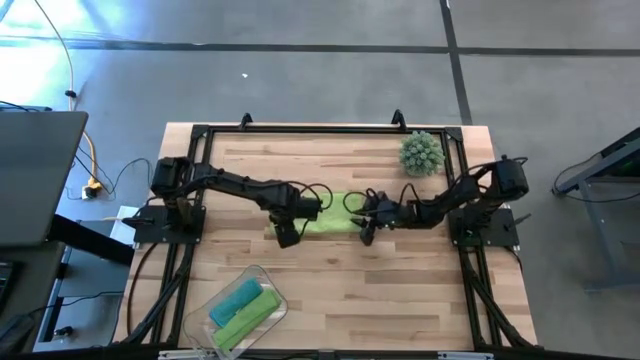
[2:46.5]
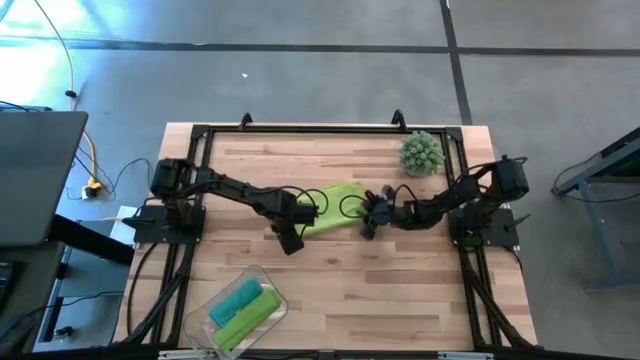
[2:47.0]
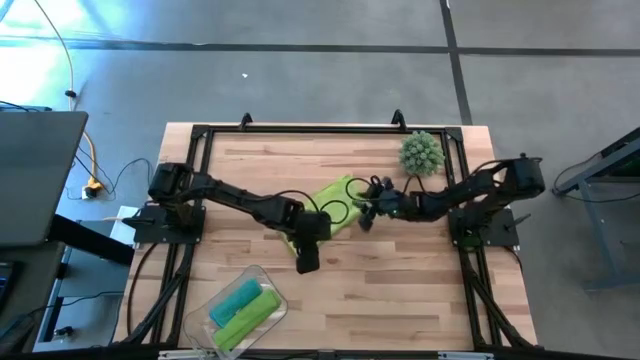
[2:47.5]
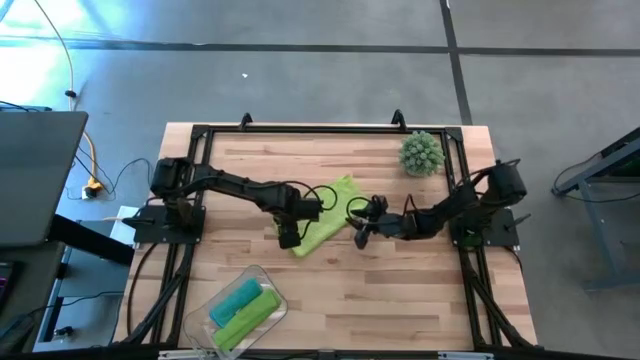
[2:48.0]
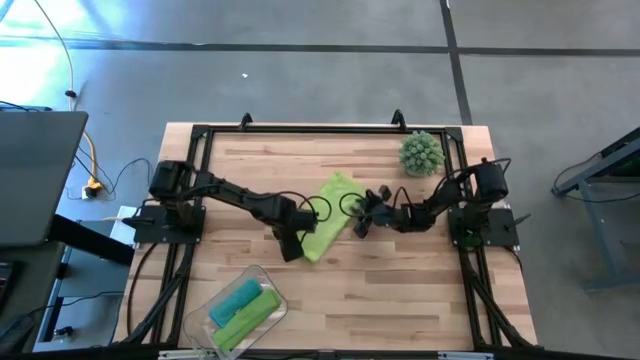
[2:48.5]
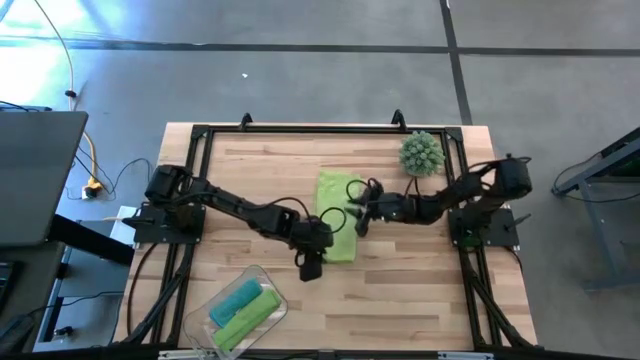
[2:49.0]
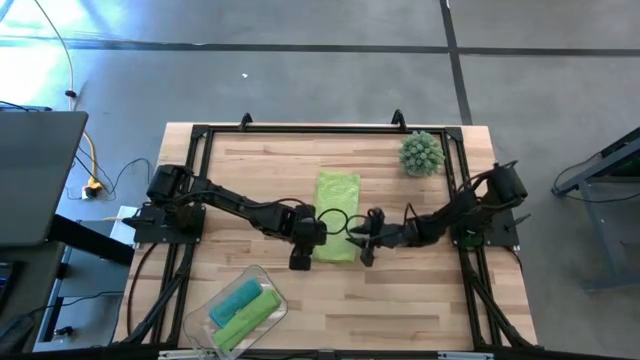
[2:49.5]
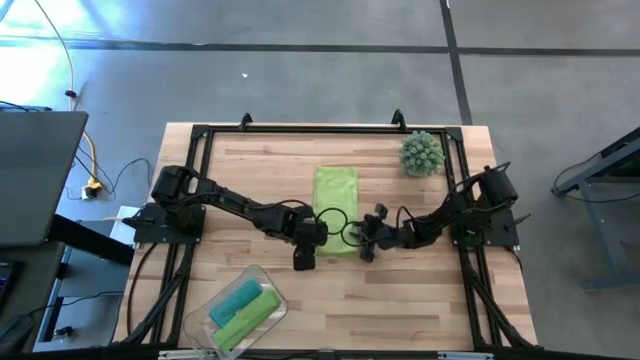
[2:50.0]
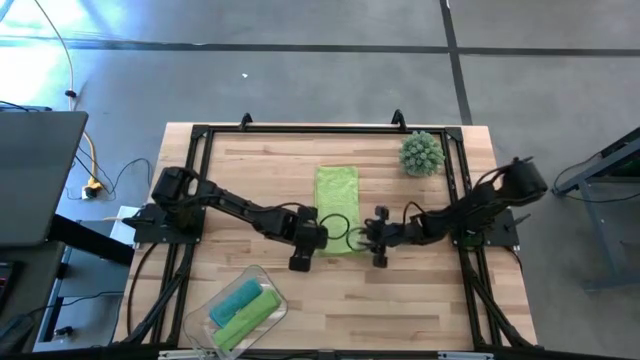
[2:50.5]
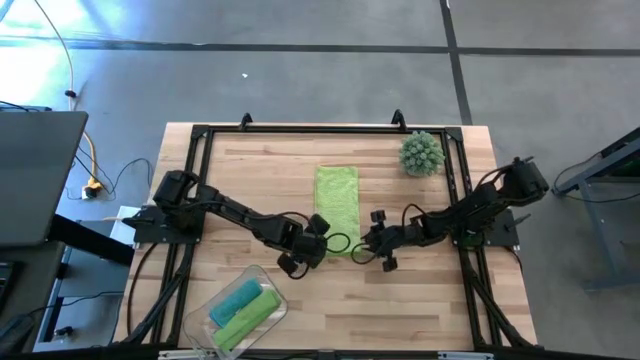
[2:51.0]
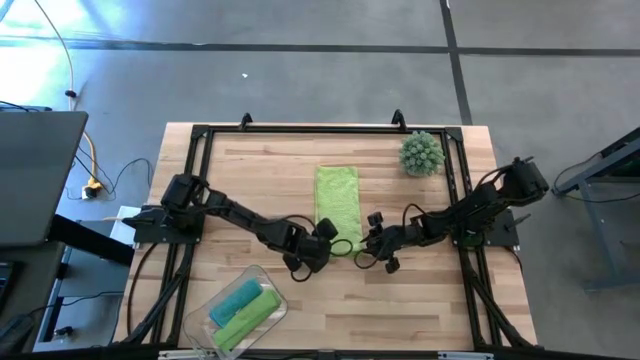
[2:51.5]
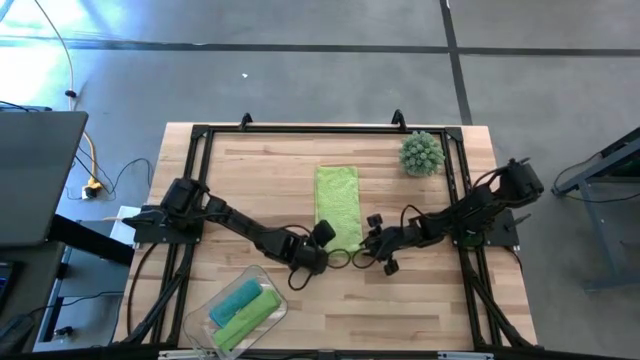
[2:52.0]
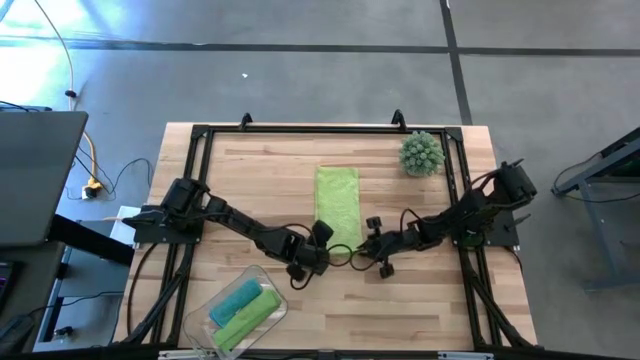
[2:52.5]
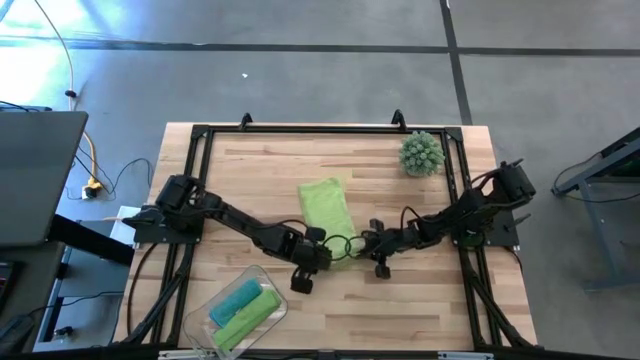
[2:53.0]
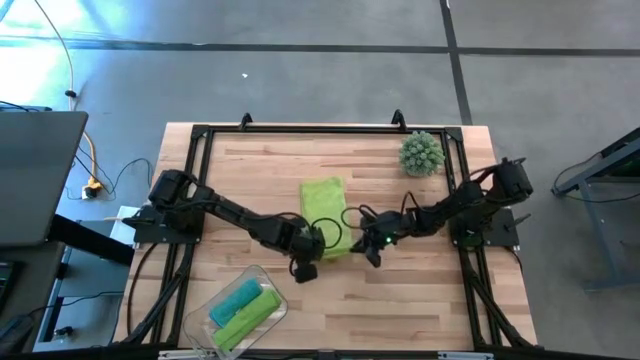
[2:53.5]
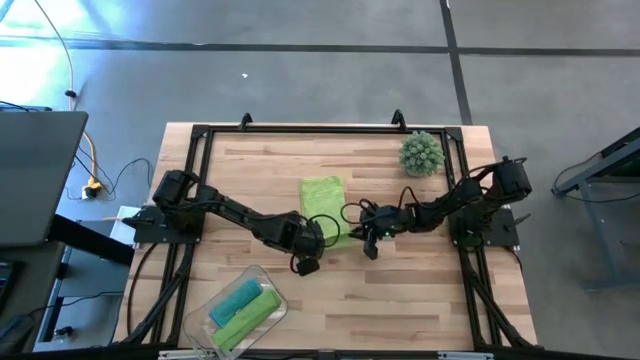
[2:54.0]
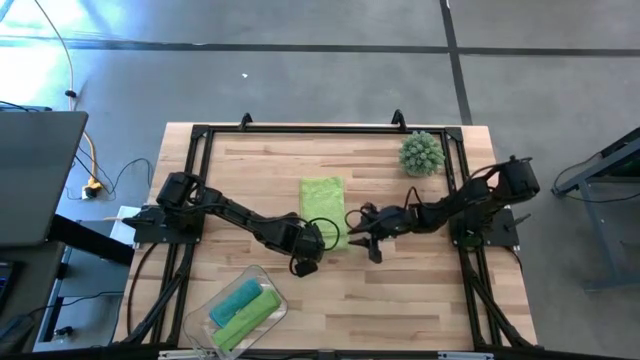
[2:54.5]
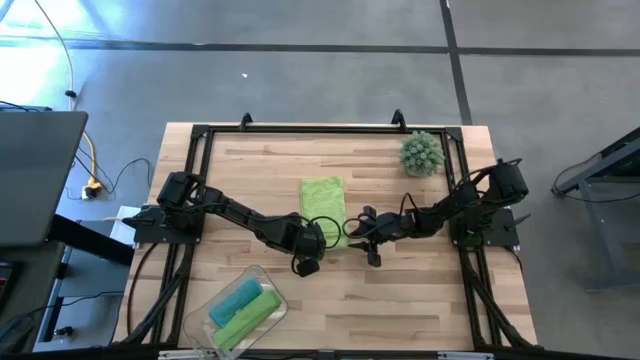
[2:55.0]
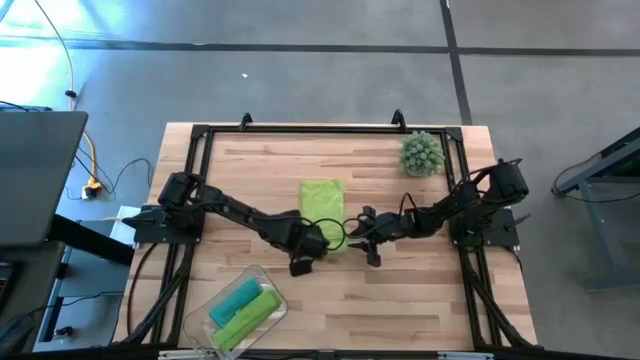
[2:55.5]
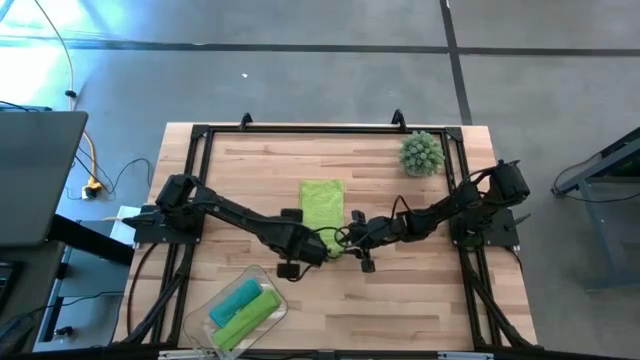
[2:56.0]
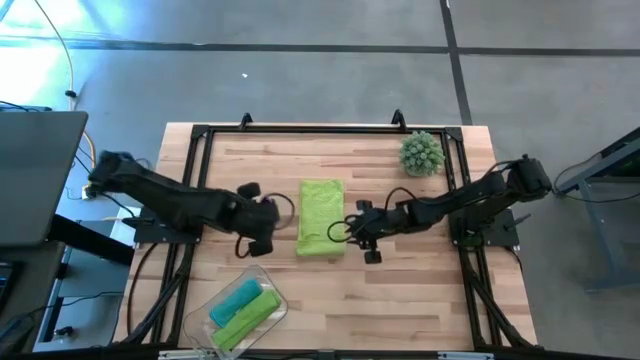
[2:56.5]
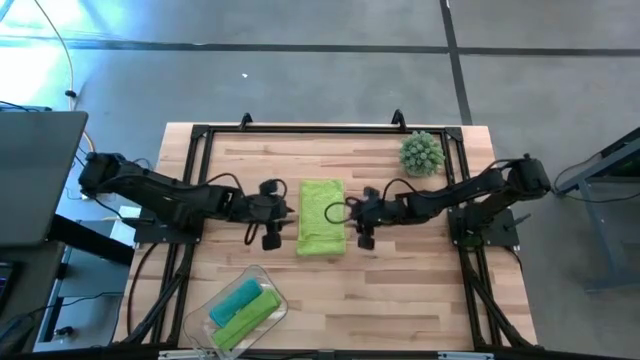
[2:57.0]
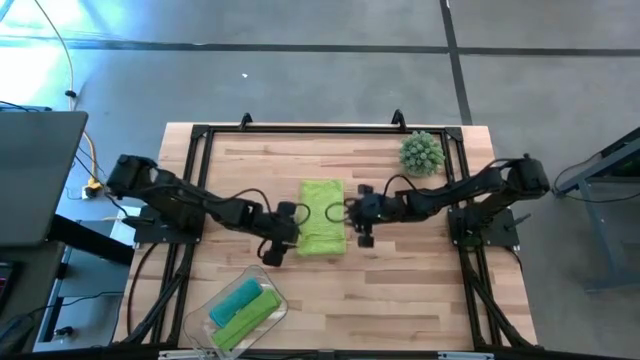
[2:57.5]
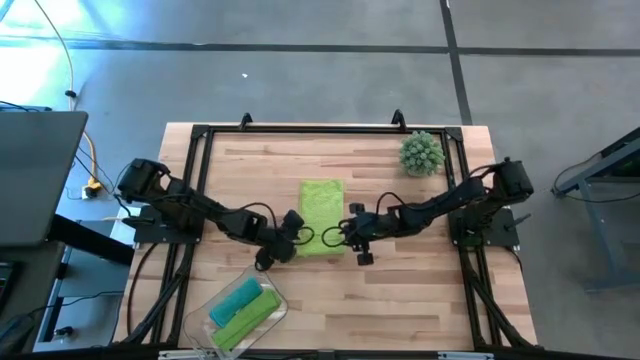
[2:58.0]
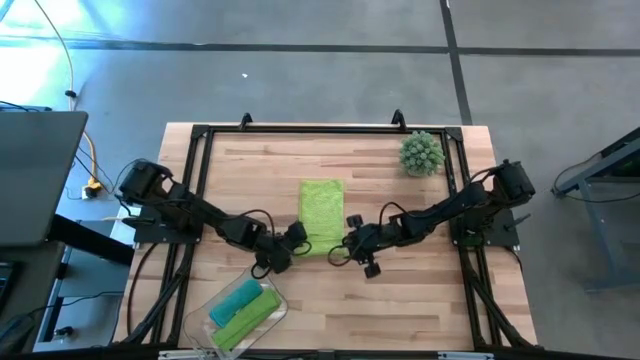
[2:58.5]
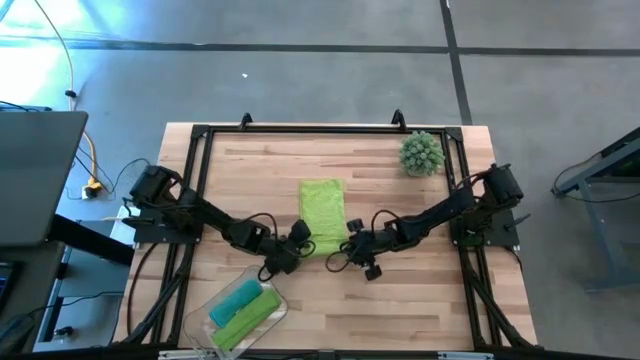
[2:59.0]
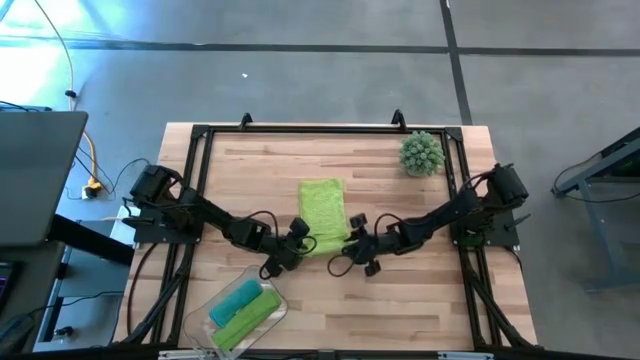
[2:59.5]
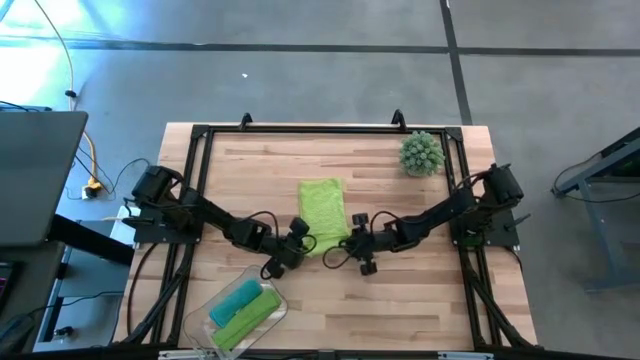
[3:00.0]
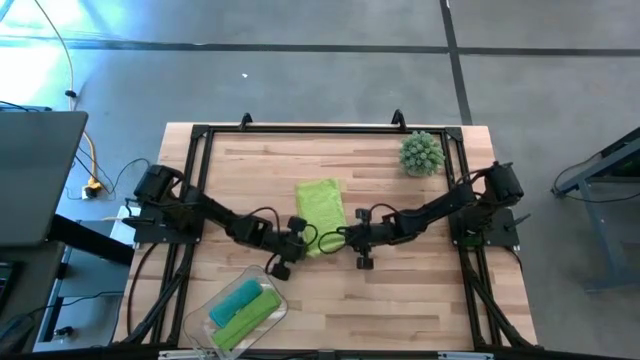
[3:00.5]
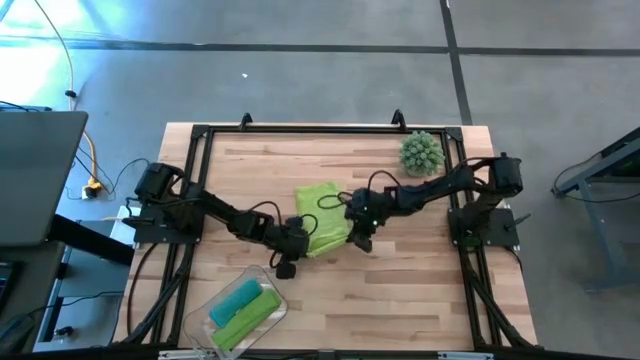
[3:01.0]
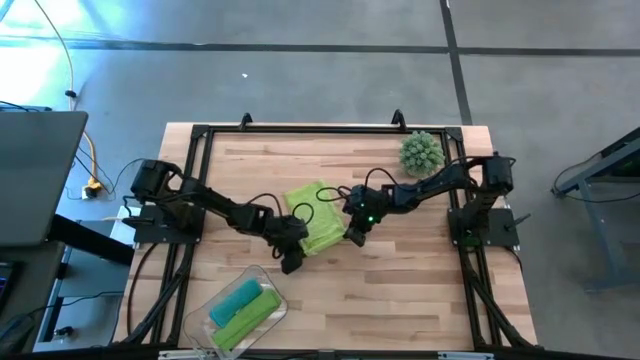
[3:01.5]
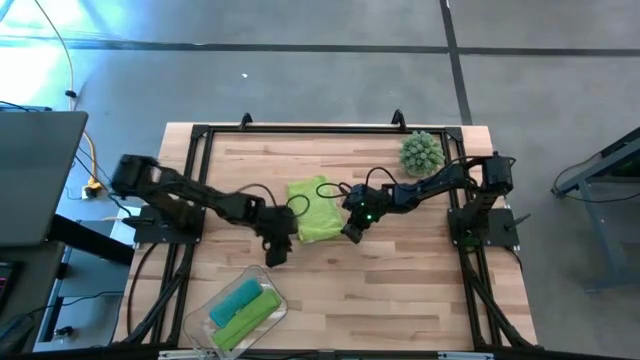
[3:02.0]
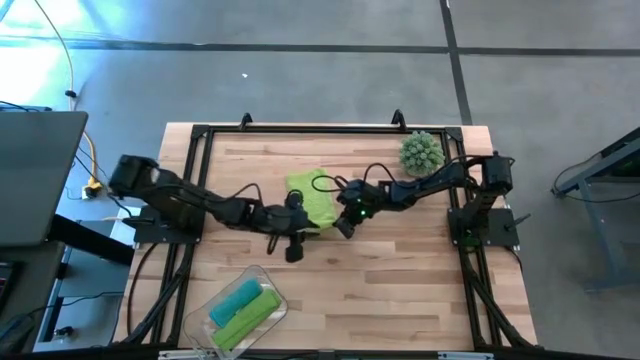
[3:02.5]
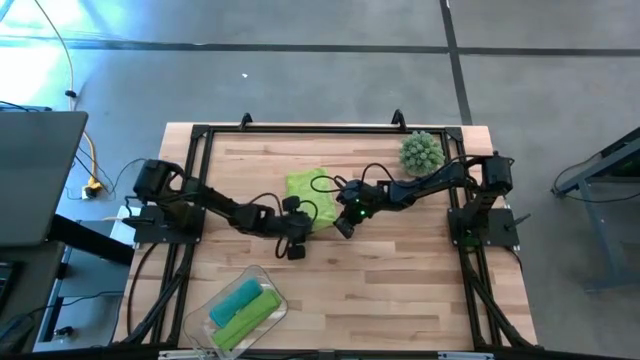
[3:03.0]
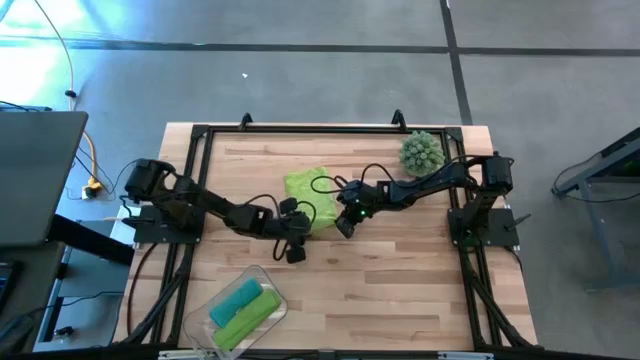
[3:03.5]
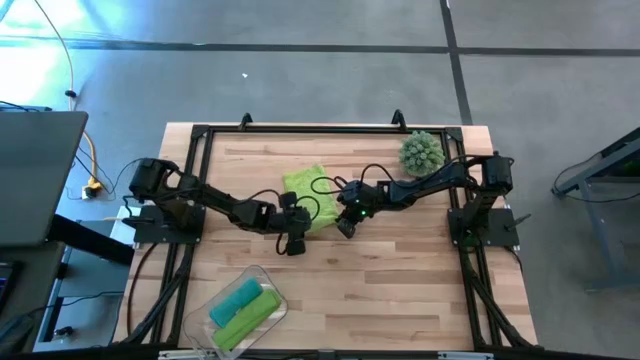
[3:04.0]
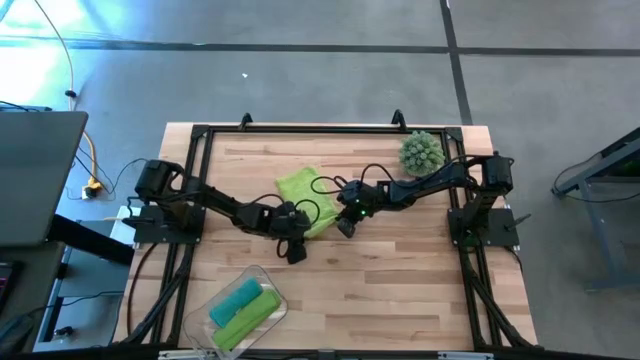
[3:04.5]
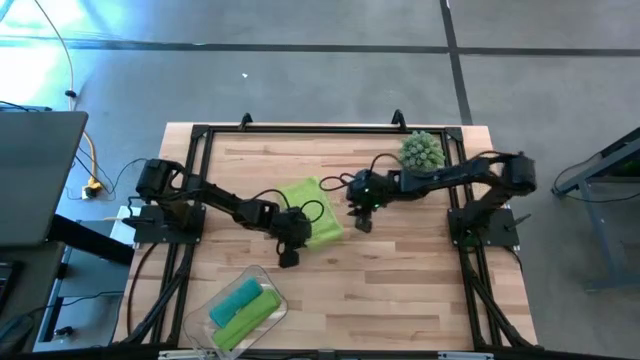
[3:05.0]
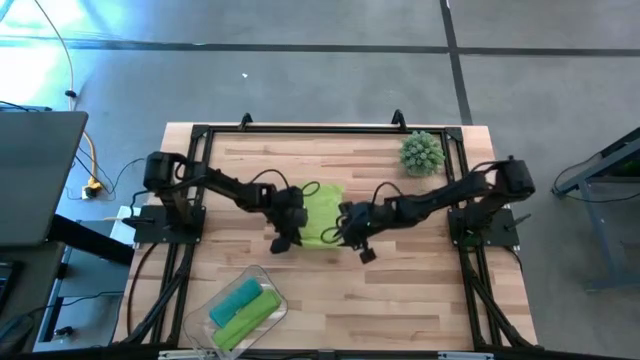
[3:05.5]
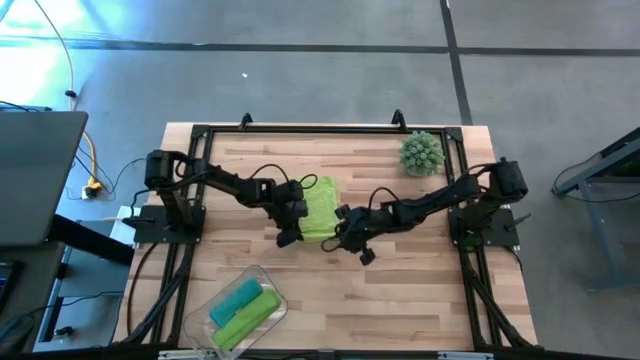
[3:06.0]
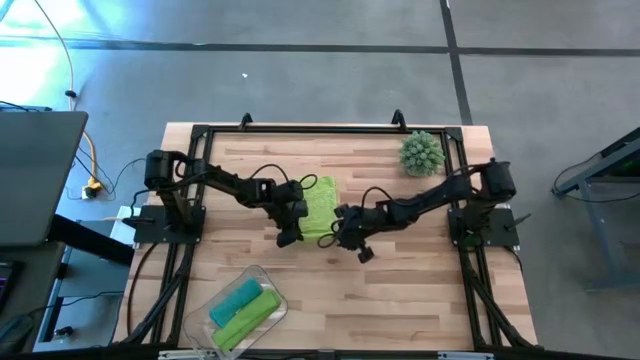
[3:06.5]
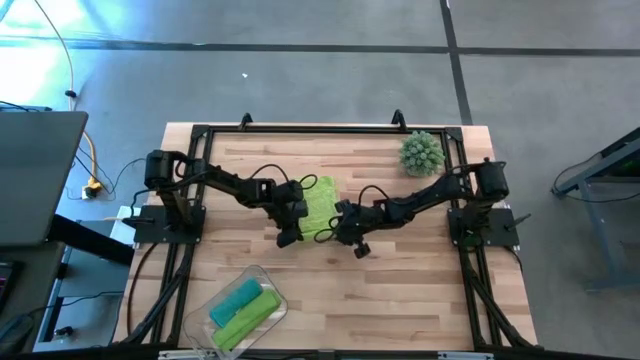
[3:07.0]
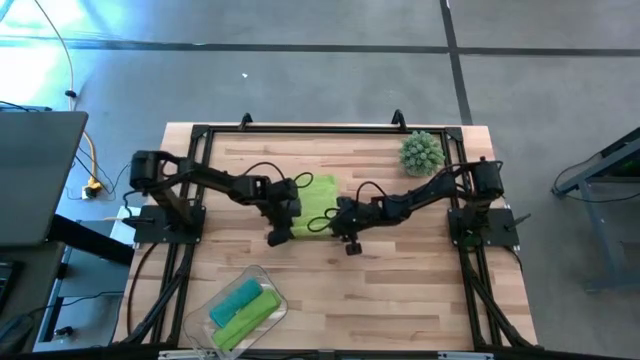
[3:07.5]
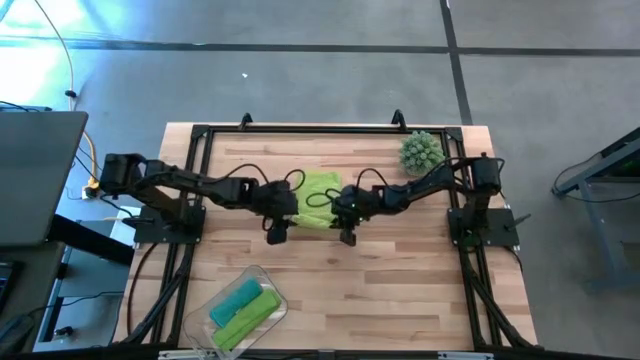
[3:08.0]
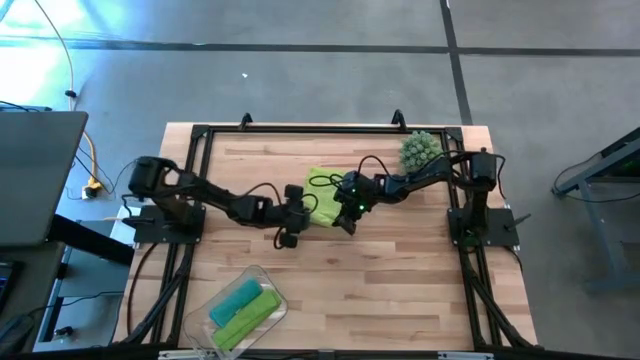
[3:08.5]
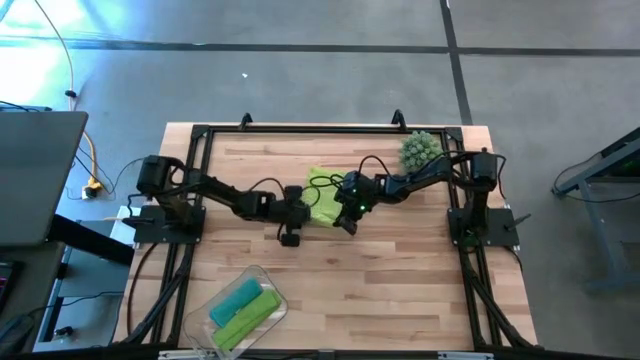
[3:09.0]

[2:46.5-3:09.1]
Task: Roll microfiber towels into tight, uniform cylinder then place into a basket
Roll the light green microfiber cloth
